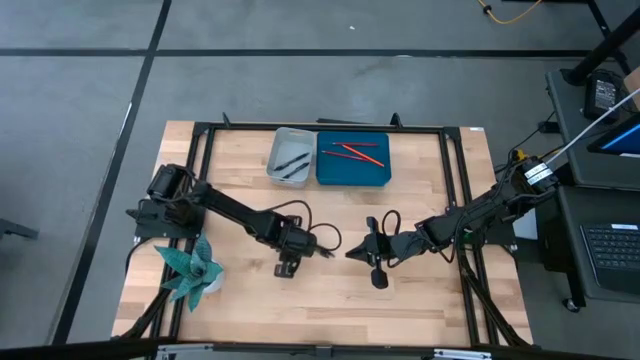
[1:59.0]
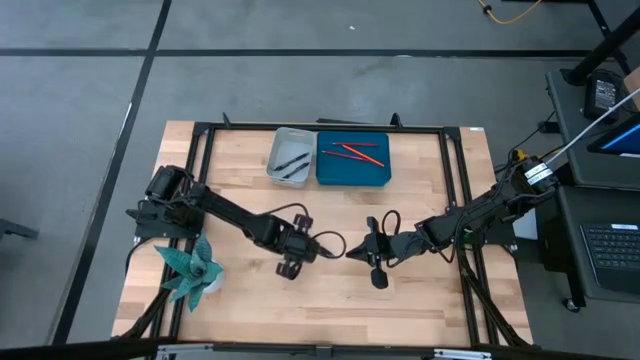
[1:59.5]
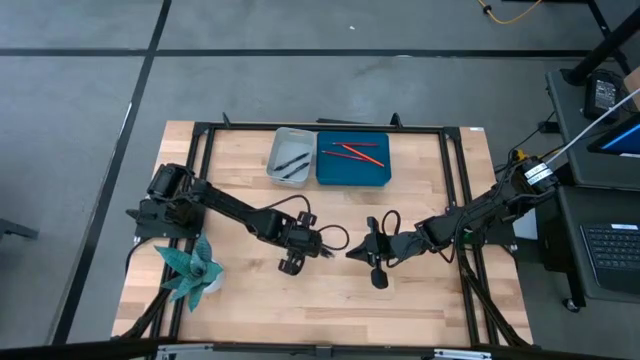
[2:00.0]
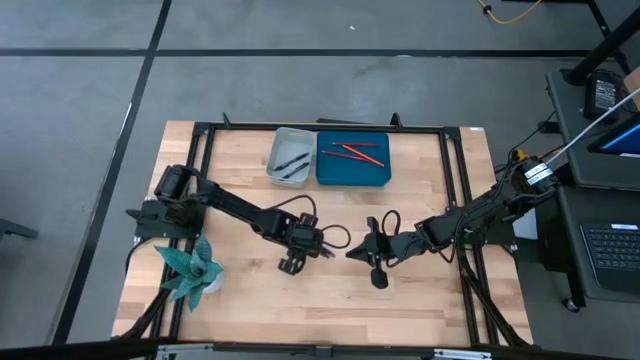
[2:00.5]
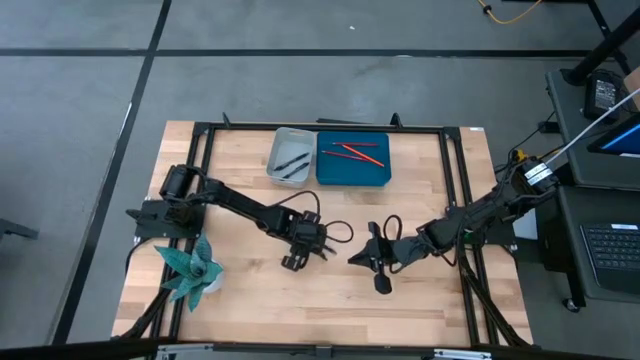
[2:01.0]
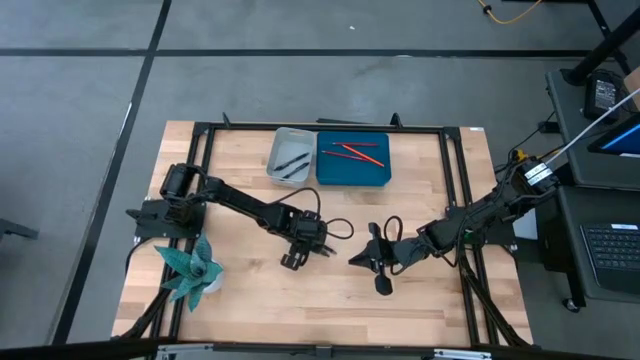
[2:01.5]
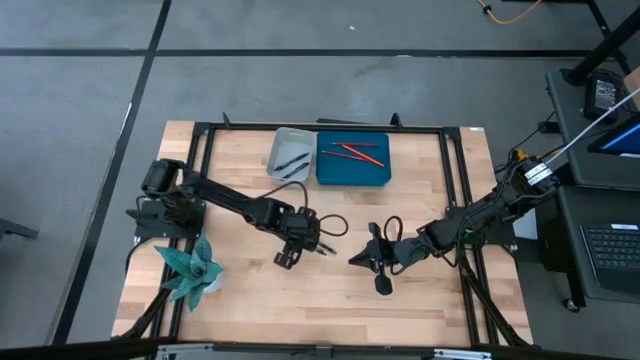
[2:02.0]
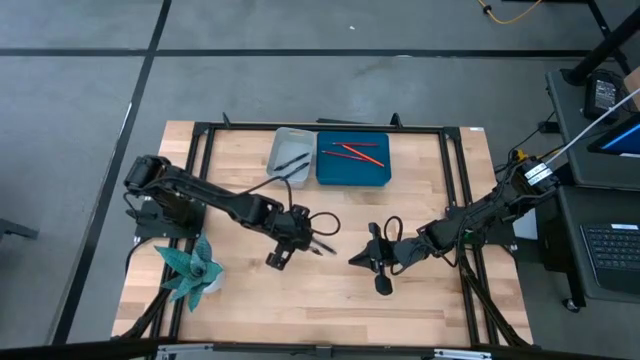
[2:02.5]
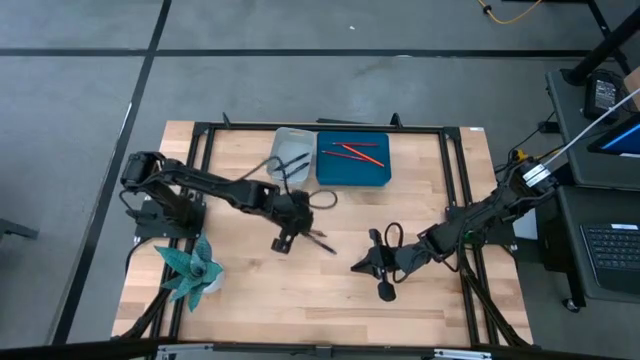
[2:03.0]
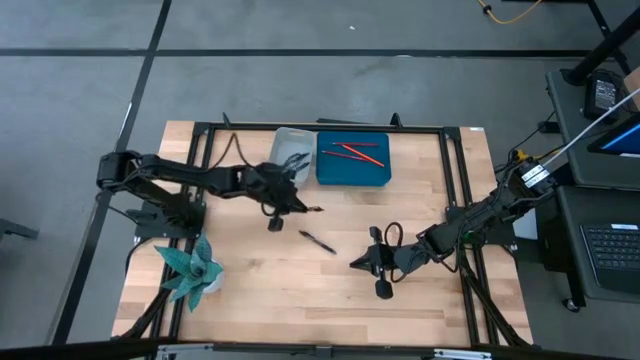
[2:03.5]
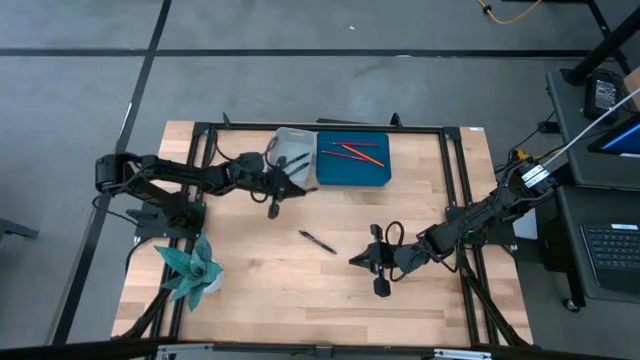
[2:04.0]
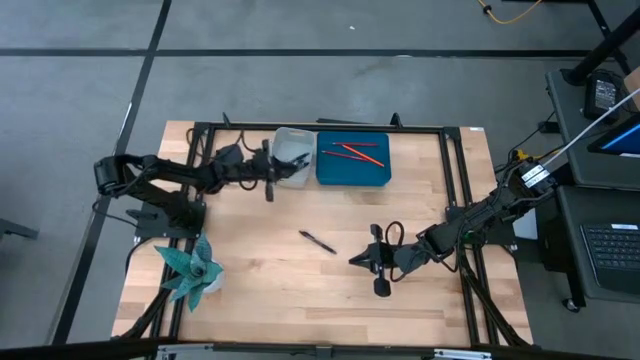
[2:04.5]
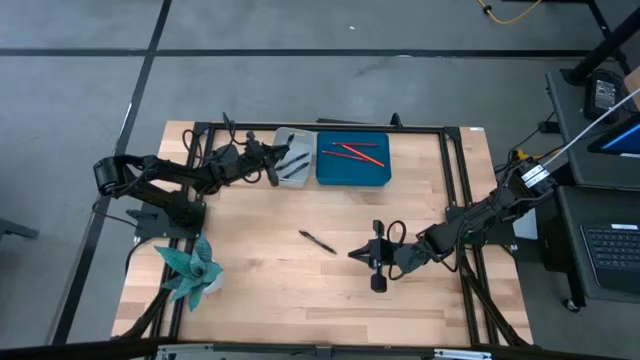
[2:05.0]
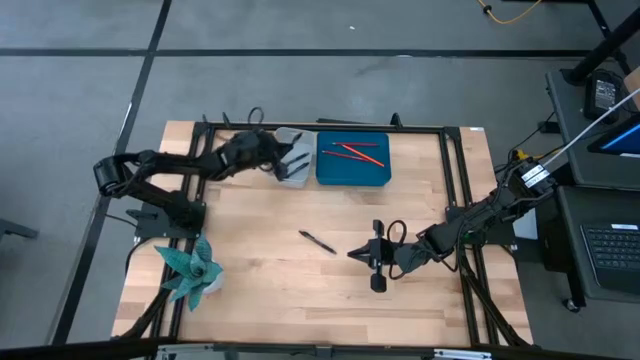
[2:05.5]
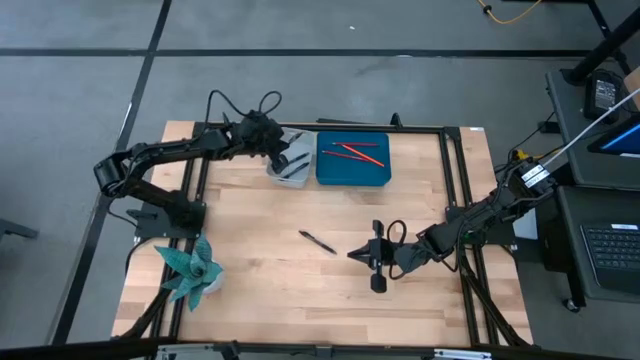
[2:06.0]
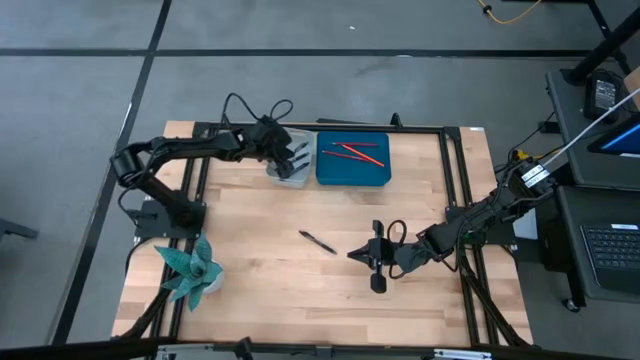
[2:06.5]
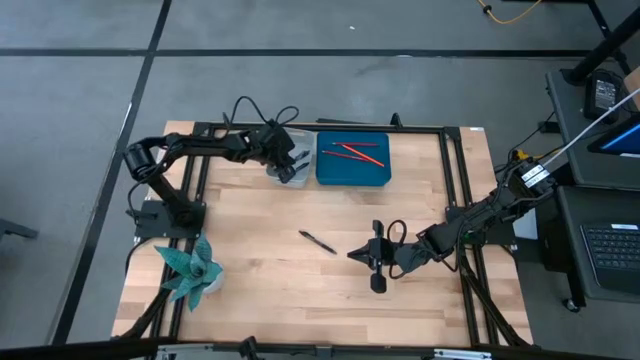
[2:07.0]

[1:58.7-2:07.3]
Task: Sort pens & pencils
Put the black pen into the gray bin

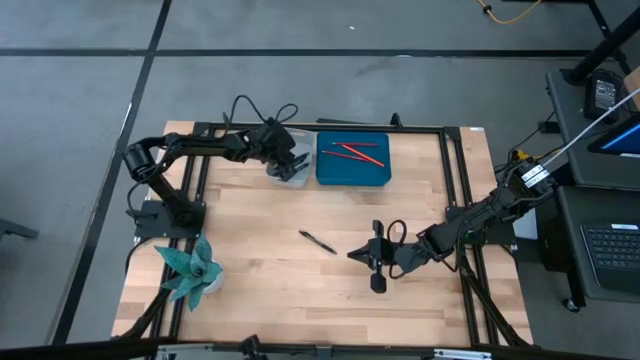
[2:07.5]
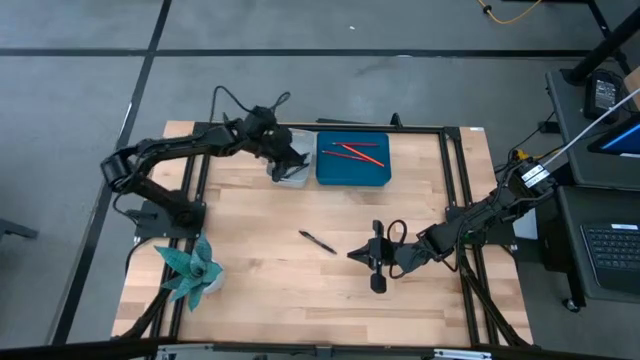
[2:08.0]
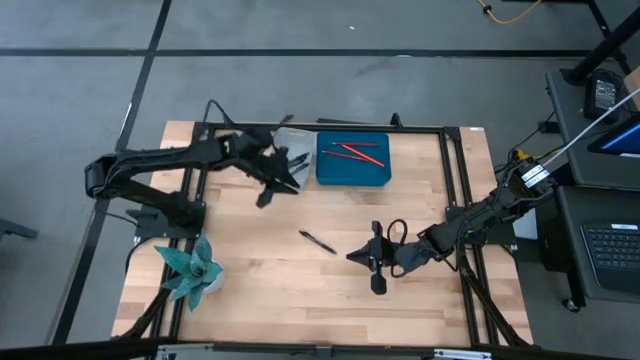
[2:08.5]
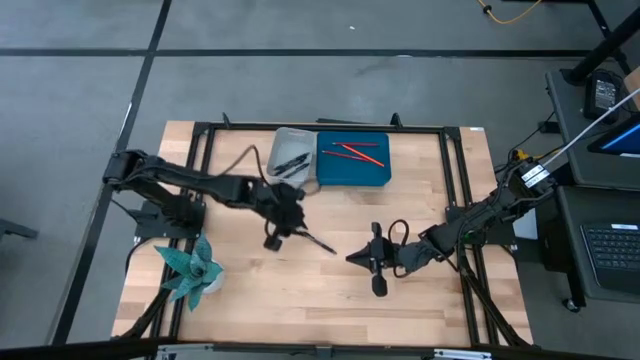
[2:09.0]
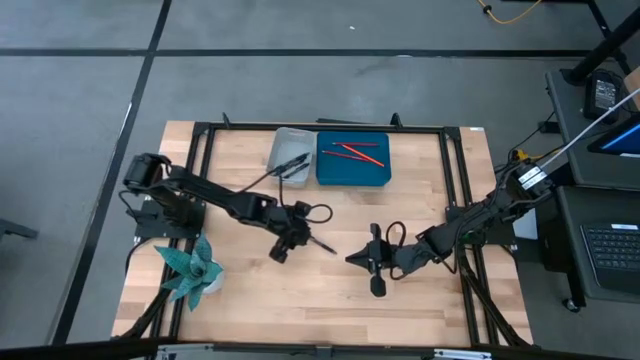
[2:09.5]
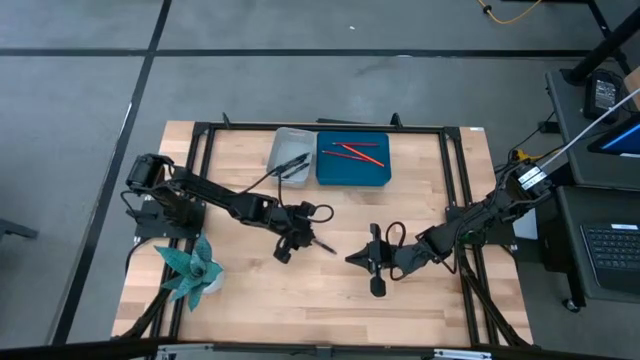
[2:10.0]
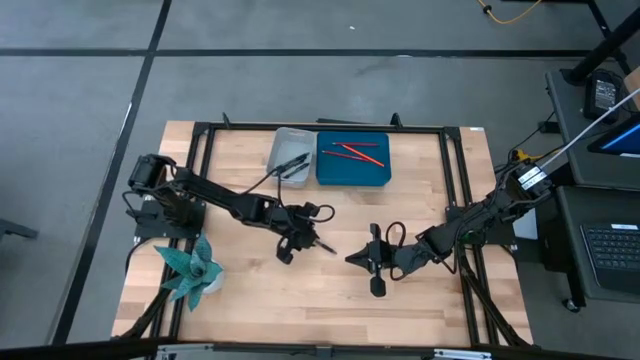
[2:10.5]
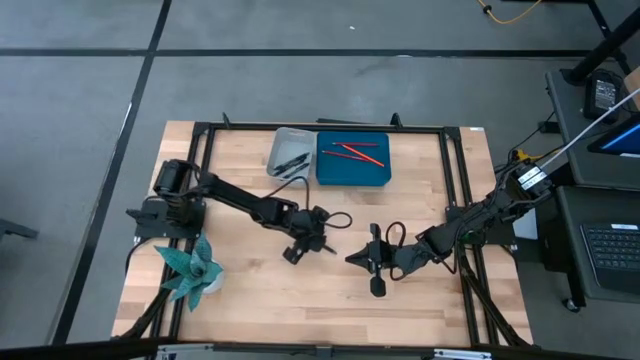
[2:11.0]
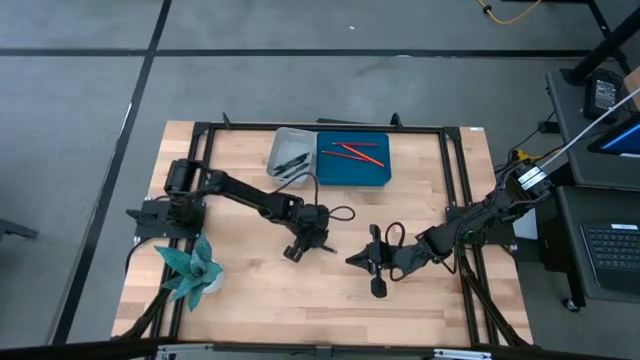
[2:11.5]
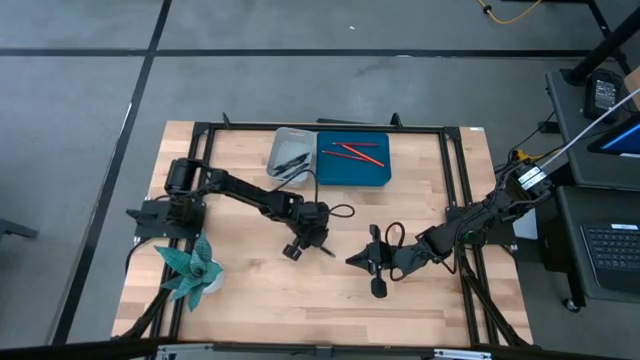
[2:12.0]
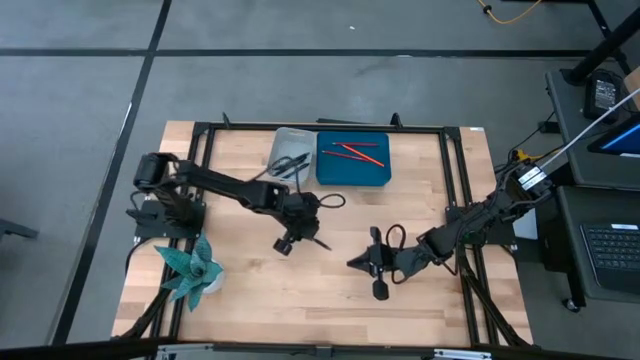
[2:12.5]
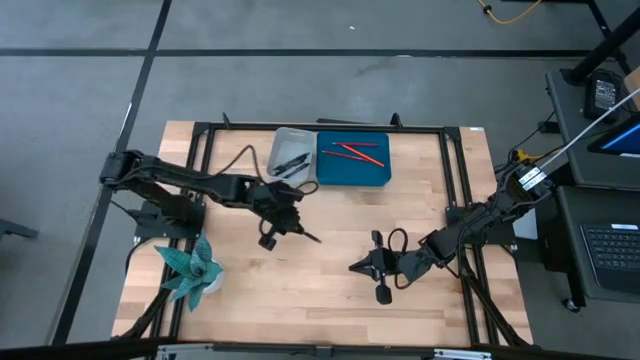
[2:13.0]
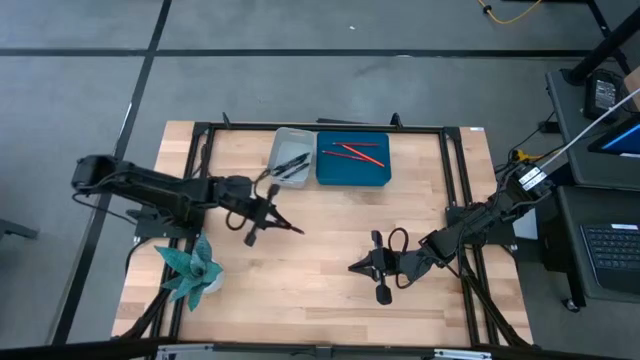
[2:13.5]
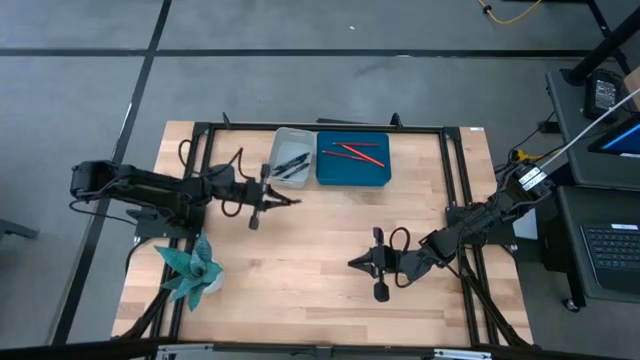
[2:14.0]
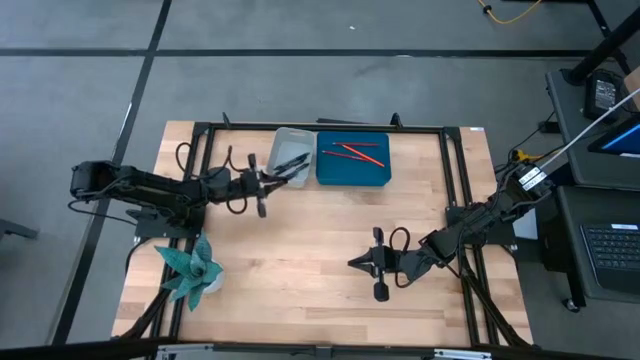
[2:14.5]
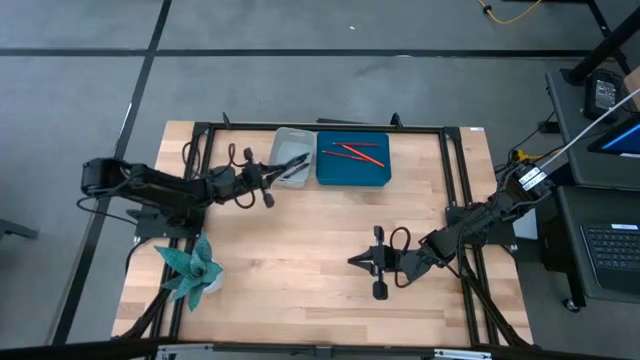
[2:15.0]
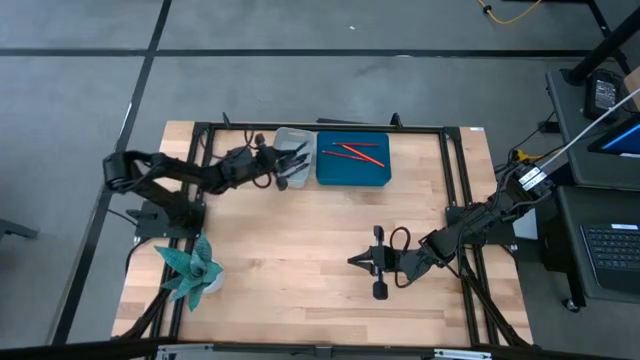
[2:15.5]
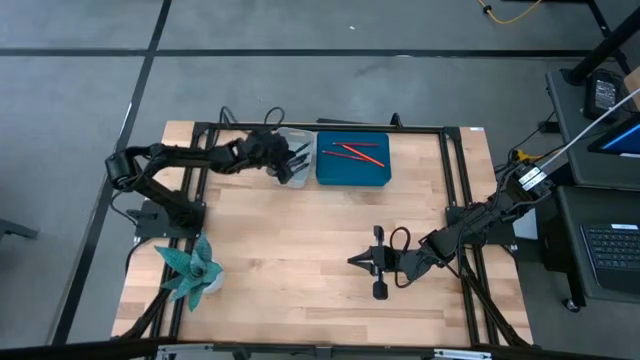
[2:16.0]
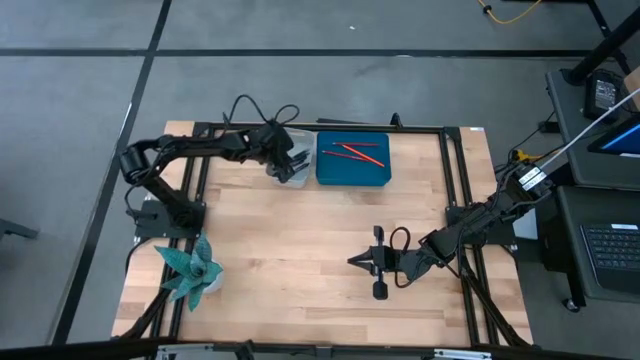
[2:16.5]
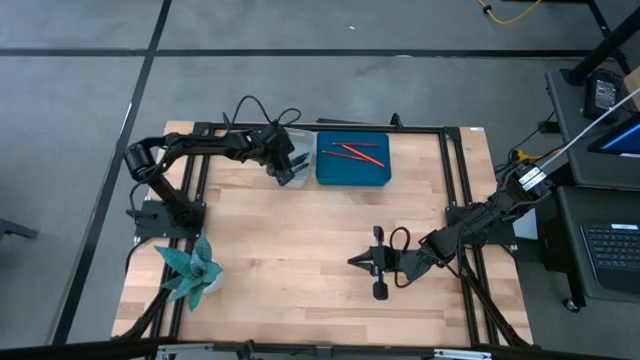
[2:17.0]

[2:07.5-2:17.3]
Put the black pen into the gray bin

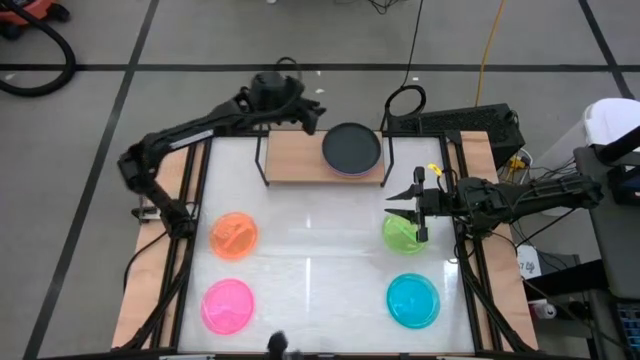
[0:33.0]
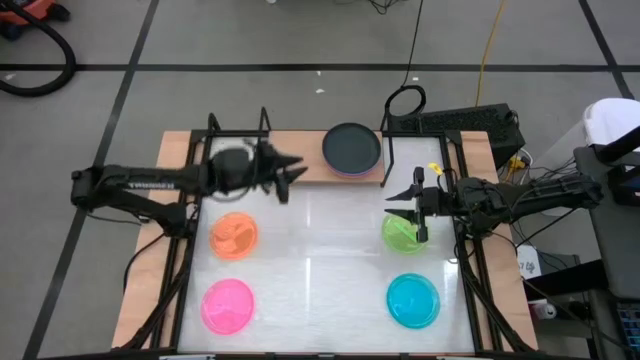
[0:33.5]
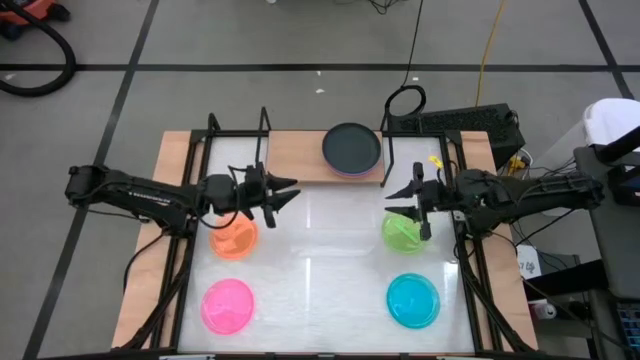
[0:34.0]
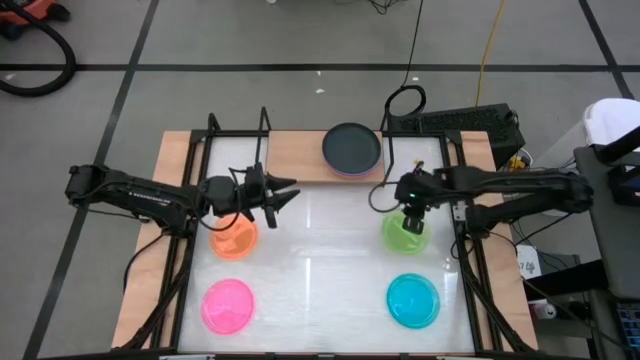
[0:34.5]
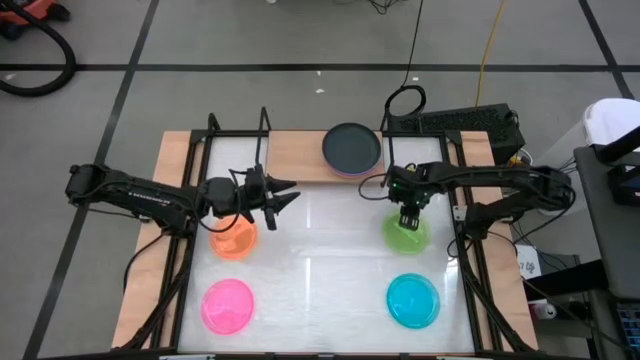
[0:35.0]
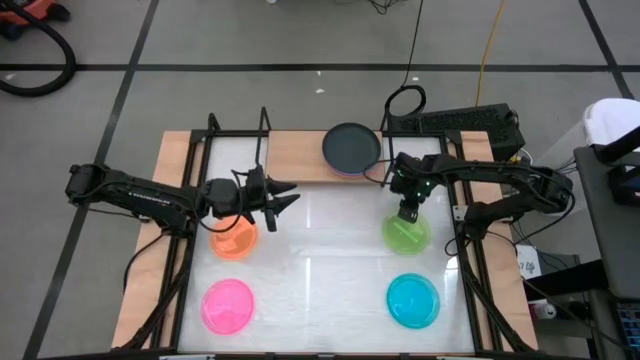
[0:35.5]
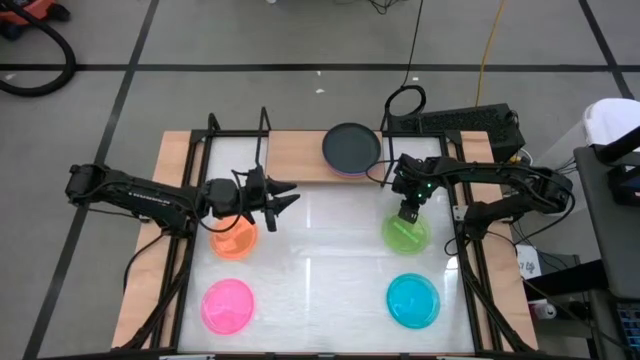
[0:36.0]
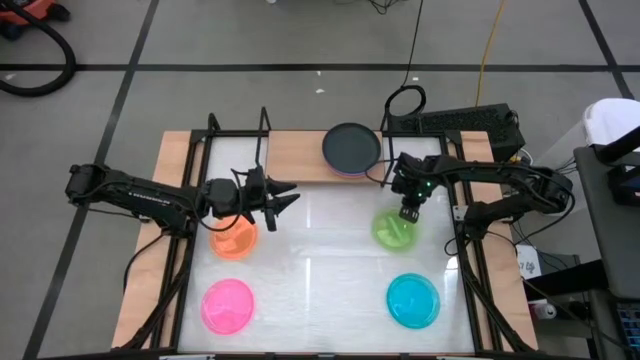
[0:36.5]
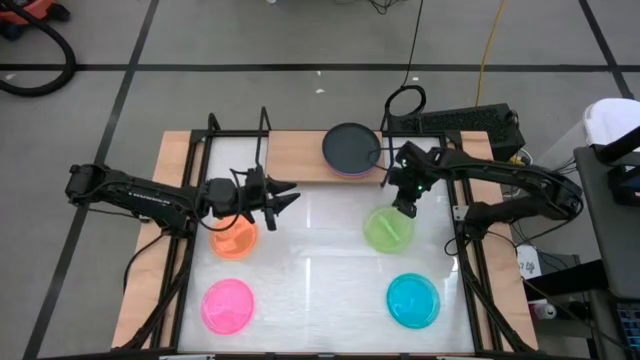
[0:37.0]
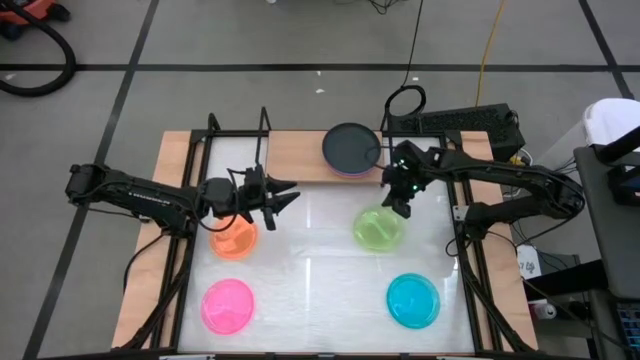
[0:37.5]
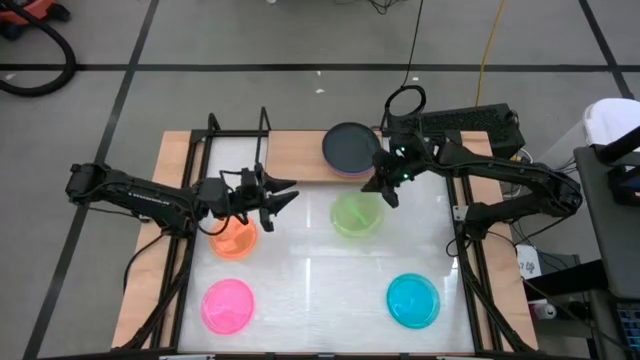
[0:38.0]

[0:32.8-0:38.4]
Task: Place and stack plates onto a shelf
Put the light green plate on the shelf
